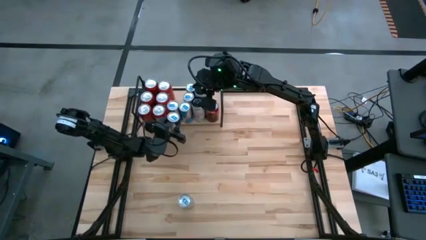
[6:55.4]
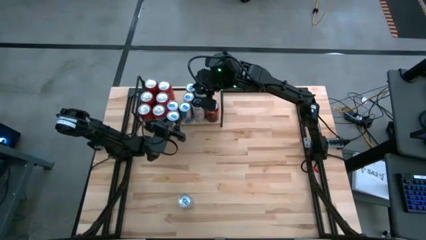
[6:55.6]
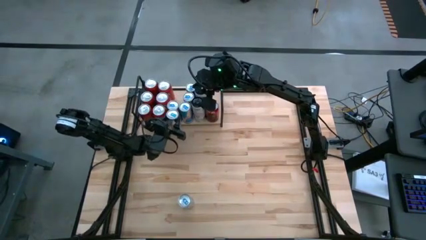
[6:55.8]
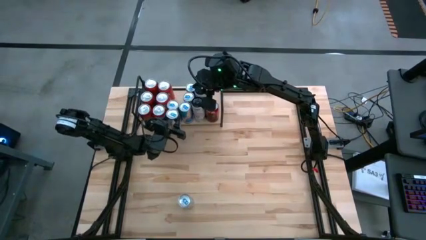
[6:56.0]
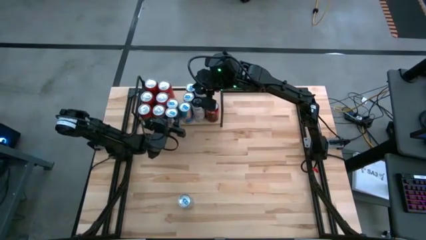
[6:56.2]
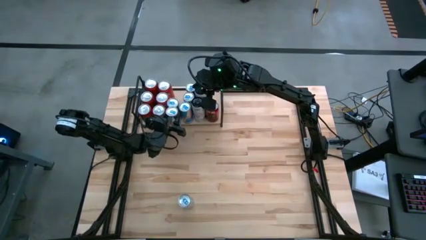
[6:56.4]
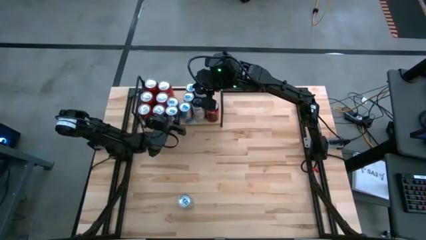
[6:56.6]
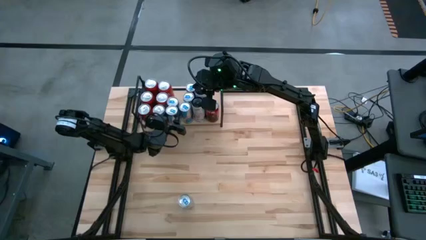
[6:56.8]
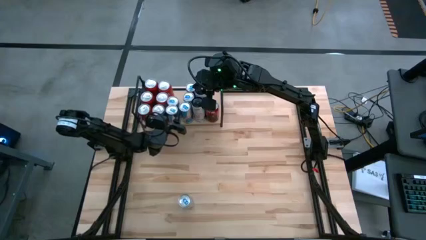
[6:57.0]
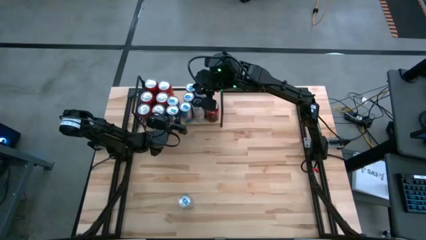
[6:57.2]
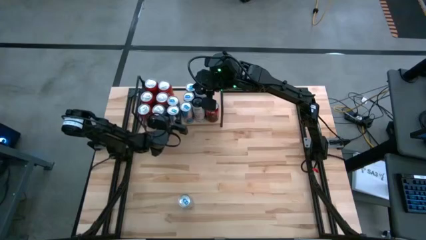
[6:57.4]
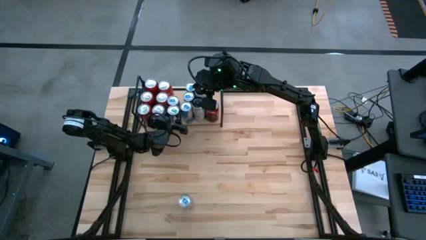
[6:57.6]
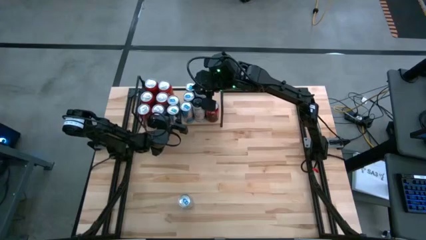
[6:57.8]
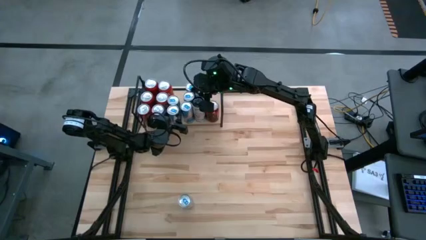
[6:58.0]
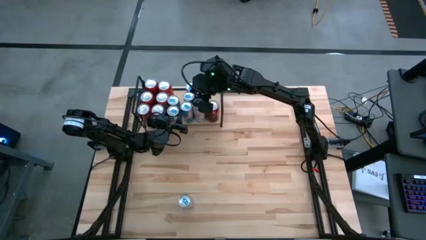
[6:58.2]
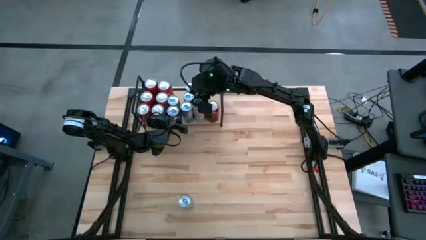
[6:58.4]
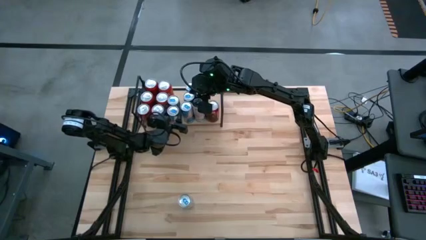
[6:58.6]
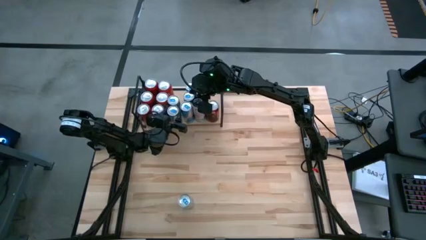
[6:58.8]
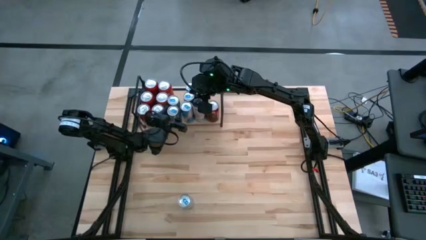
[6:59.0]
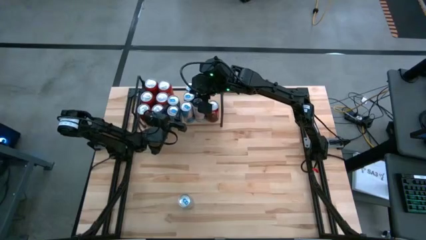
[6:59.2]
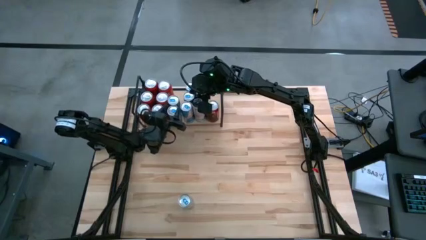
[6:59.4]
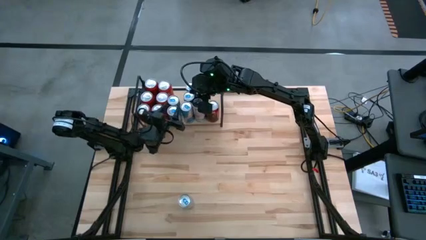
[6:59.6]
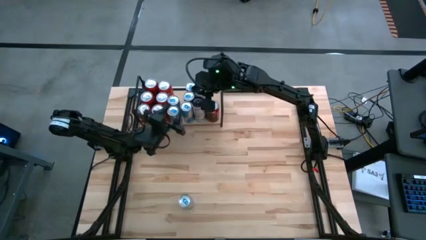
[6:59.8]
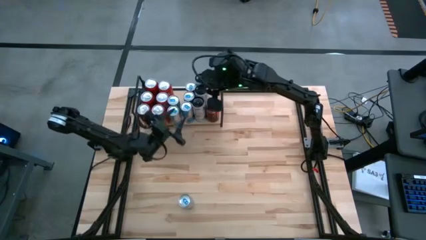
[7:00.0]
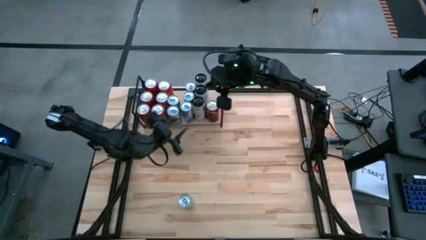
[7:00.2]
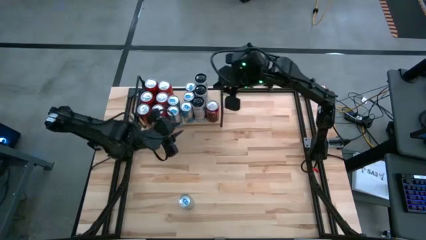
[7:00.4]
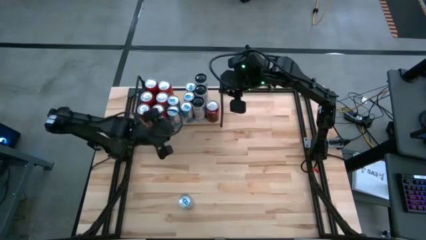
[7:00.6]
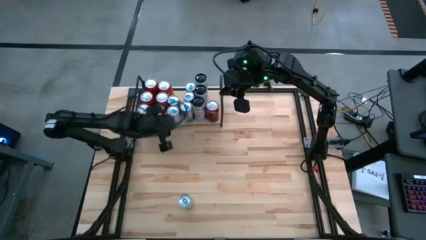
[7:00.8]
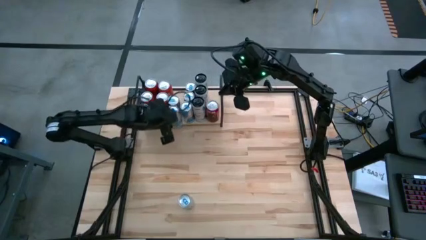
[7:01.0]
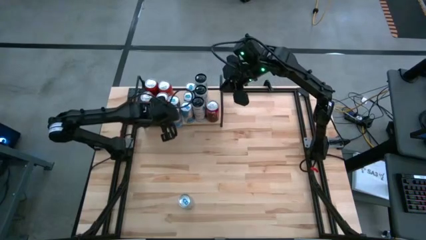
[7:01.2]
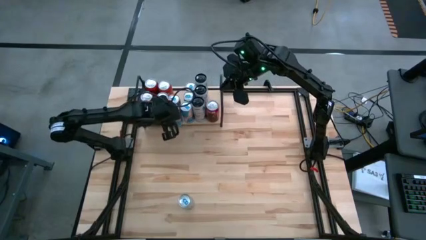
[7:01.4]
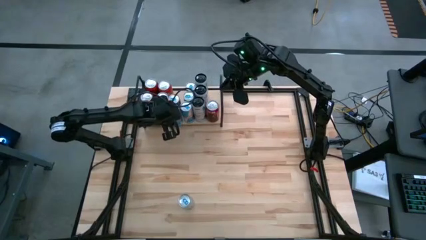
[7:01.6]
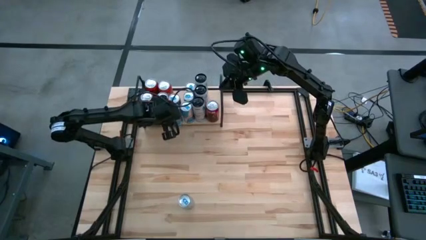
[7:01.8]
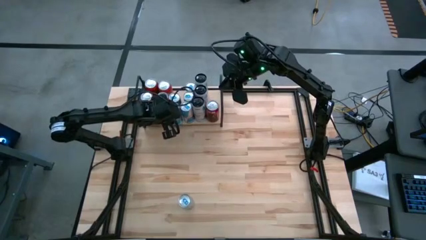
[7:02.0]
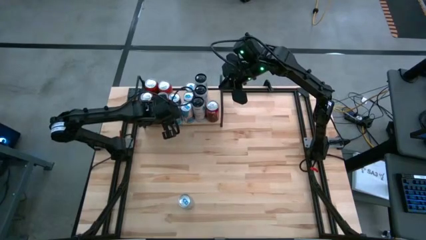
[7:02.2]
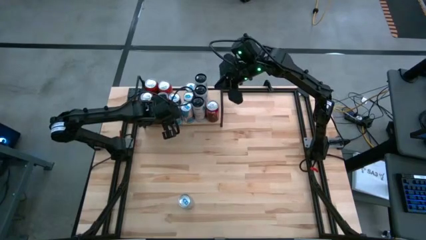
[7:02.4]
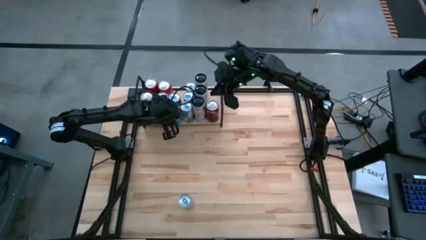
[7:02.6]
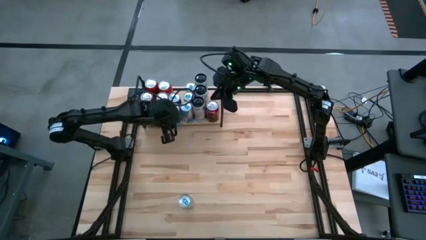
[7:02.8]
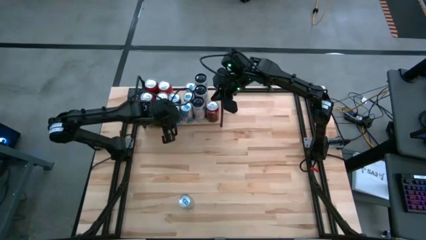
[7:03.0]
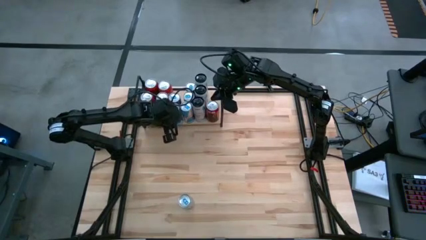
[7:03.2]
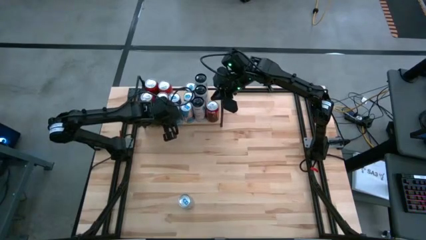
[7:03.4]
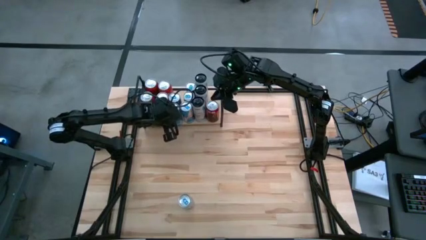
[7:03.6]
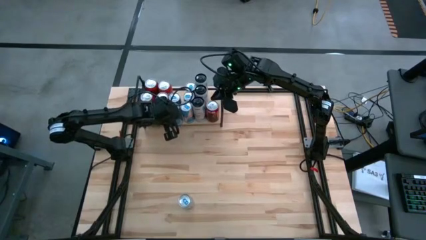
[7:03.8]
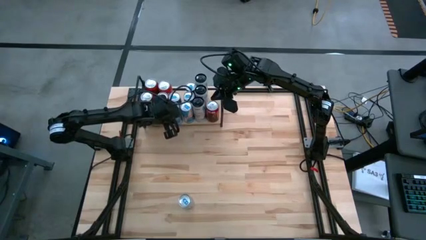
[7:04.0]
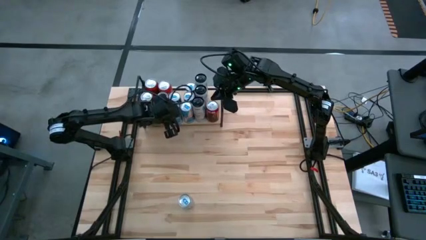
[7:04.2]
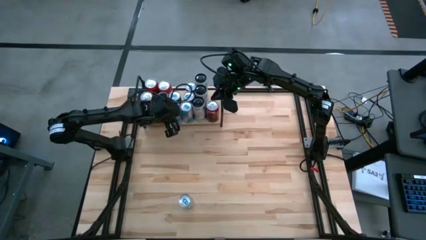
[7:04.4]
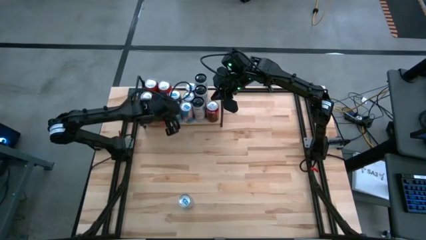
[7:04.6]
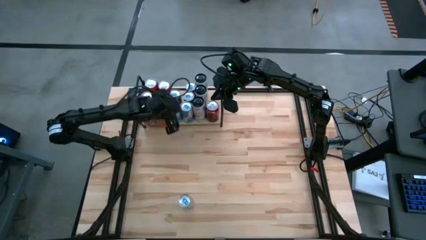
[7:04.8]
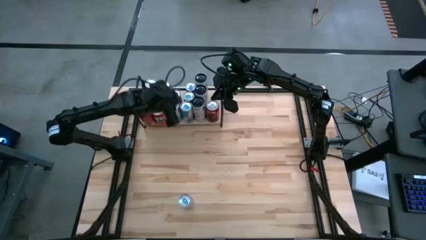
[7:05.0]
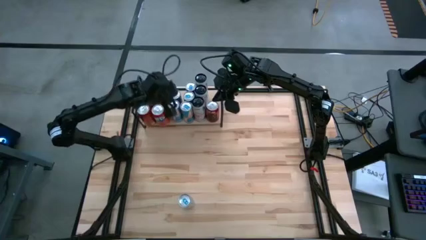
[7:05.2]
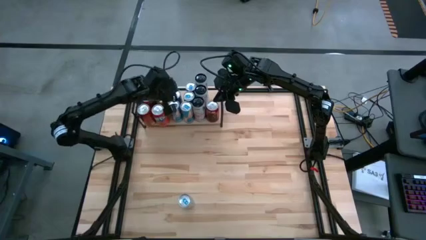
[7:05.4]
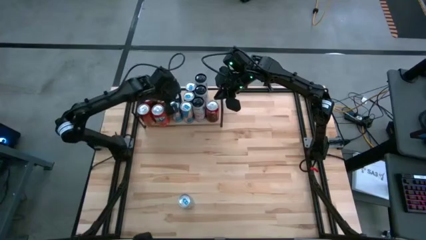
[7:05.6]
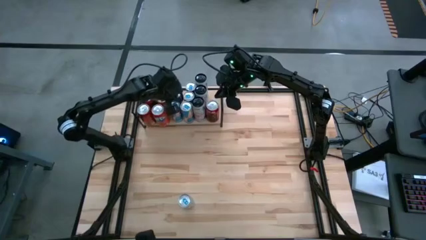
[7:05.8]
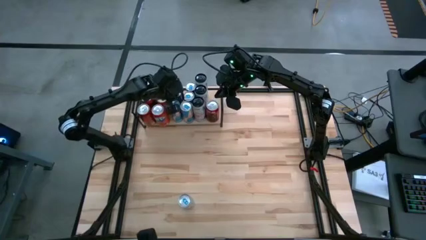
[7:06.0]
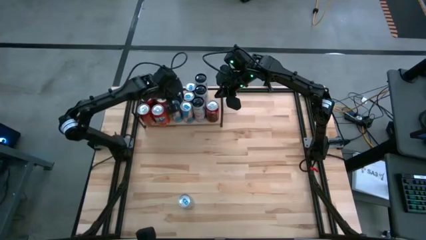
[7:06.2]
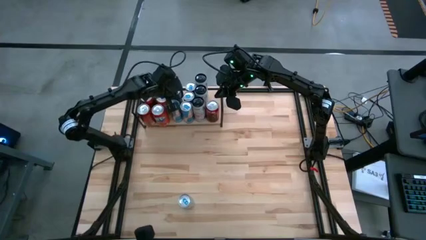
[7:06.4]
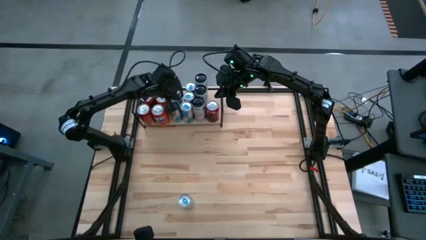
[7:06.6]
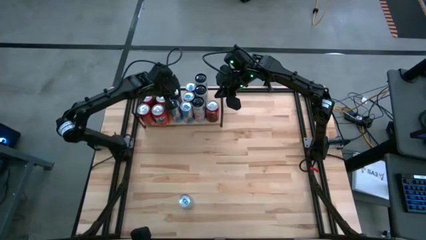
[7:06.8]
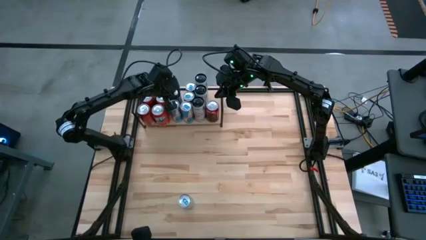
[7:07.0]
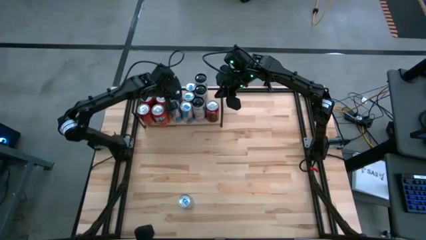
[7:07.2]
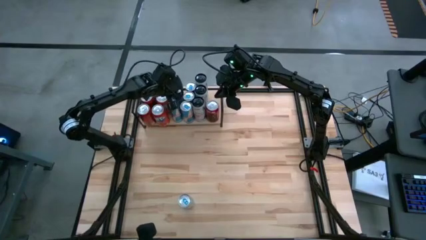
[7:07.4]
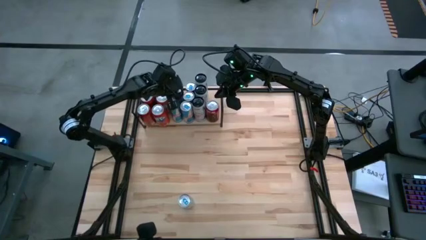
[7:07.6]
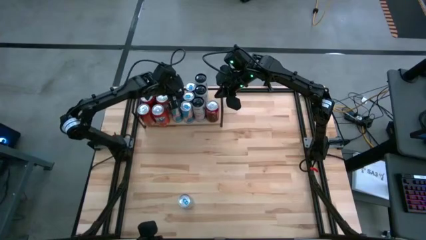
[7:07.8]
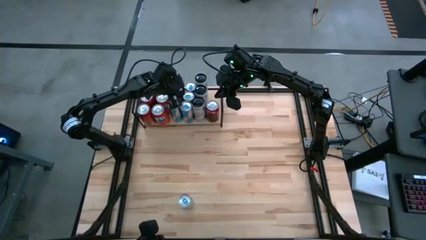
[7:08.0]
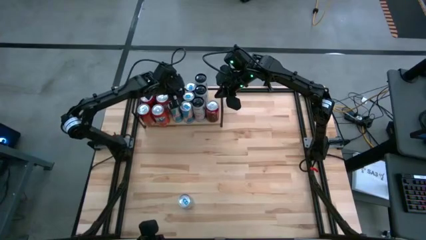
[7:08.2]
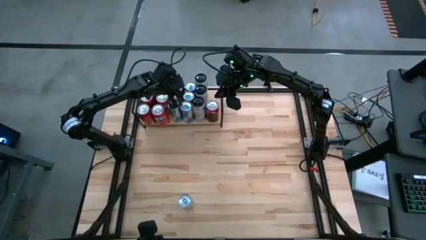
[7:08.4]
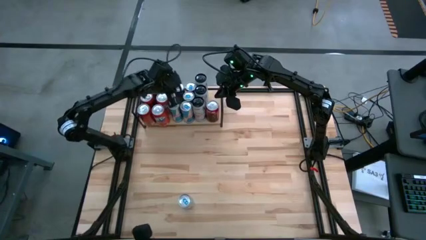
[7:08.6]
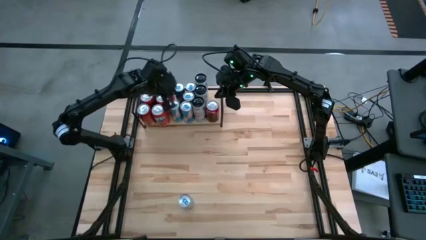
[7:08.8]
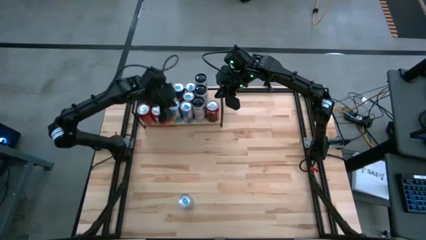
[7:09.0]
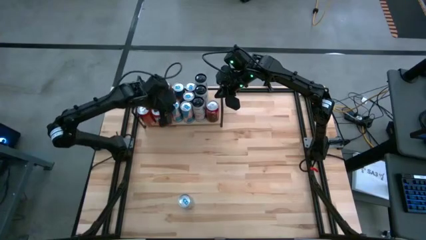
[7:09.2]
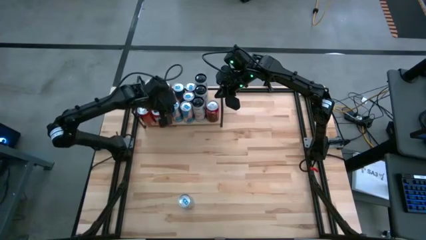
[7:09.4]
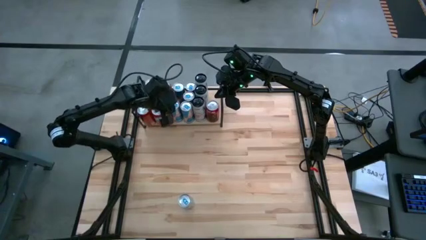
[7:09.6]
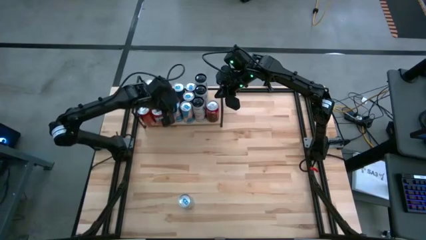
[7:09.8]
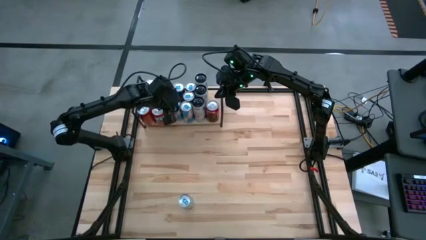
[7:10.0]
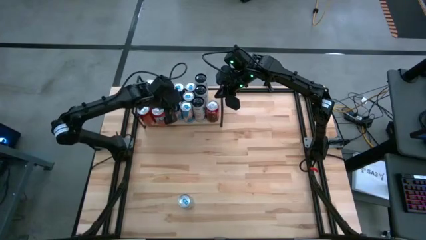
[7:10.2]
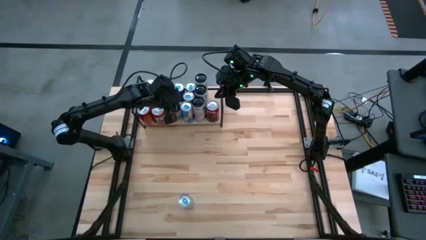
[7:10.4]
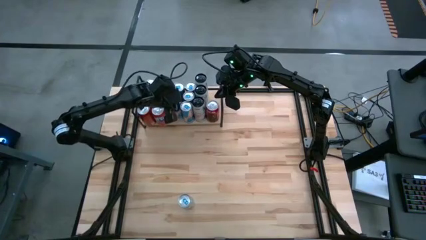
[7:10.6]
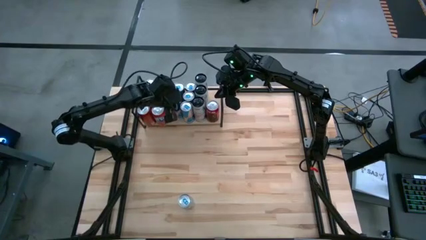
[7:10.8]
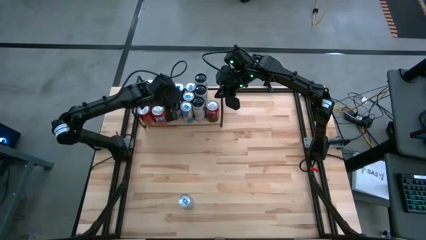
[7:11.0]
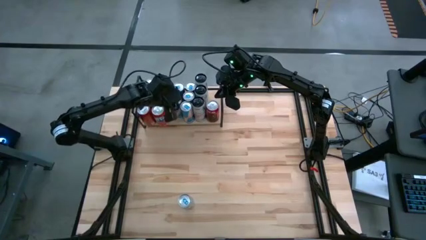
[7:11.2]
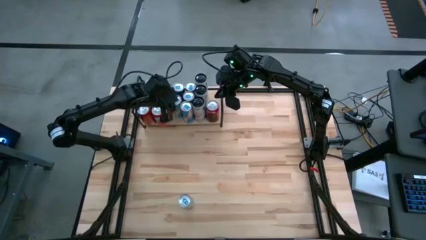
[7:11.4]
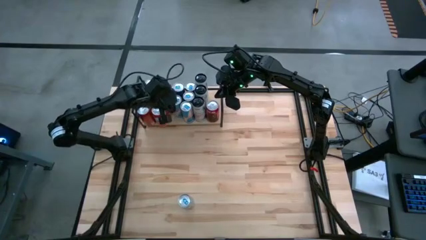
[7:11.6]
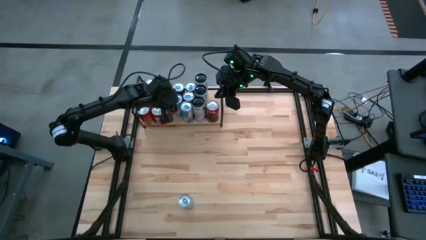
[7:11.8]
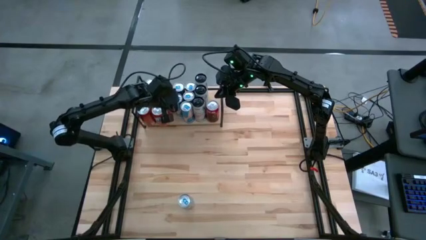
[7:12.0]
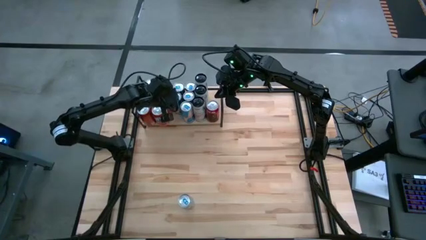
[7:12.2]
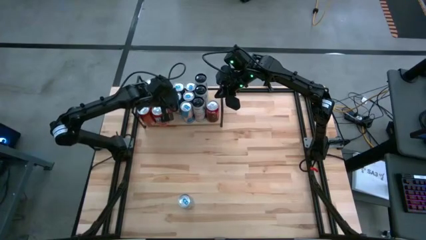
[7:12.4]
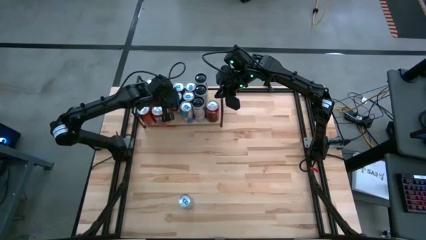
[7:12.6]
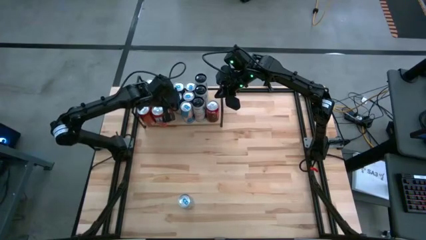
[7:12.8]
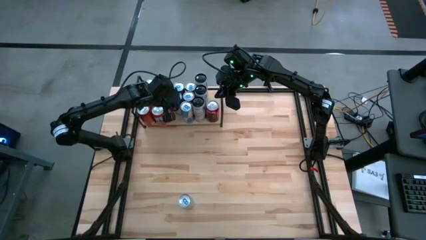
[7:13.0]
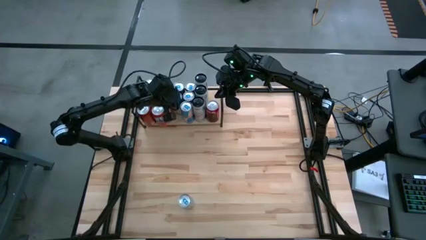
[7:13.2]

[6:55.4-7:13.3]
Task: Place canned beverage on shelf
Put the blue soda can on the shelf aligned with the other blue soda can
